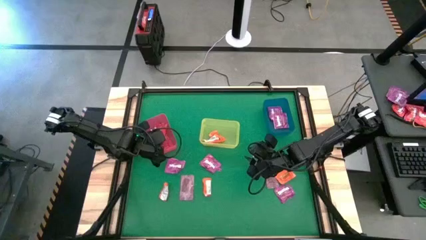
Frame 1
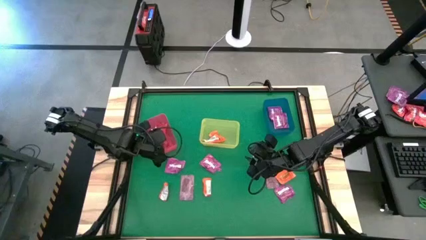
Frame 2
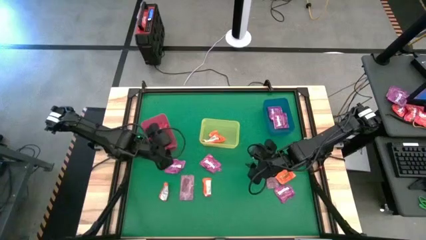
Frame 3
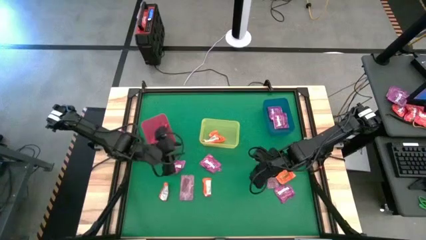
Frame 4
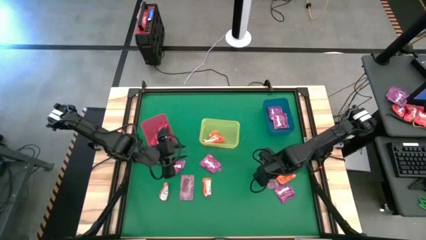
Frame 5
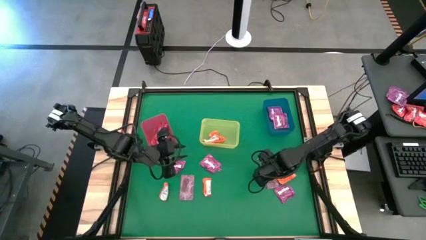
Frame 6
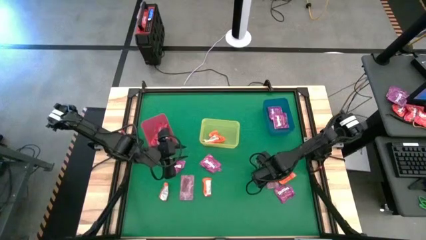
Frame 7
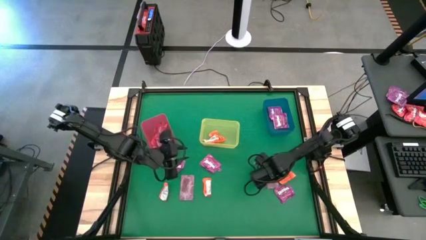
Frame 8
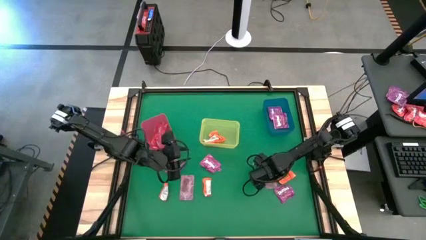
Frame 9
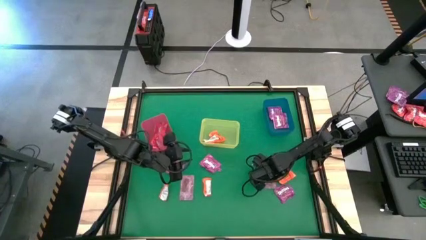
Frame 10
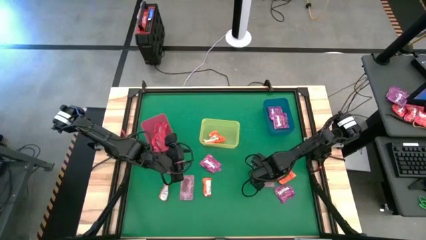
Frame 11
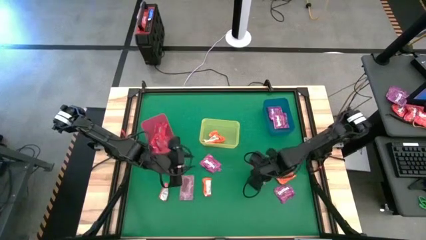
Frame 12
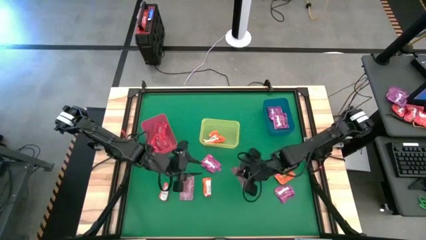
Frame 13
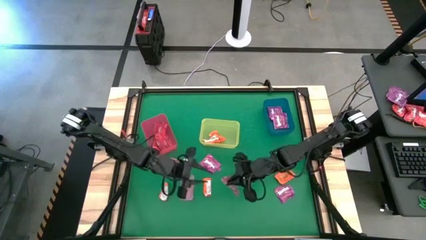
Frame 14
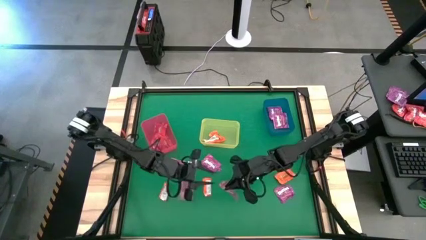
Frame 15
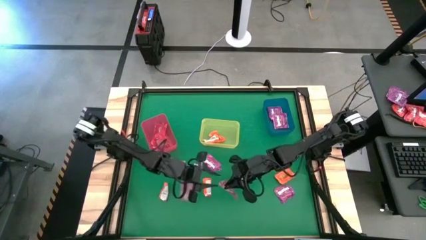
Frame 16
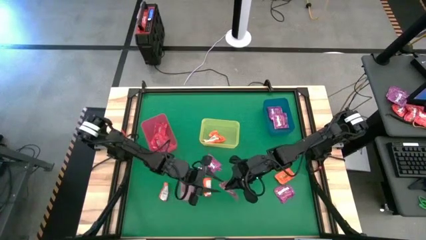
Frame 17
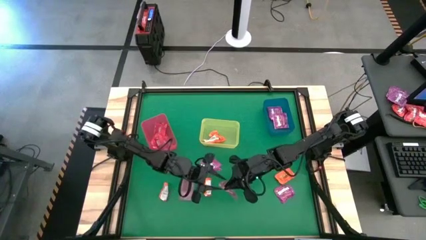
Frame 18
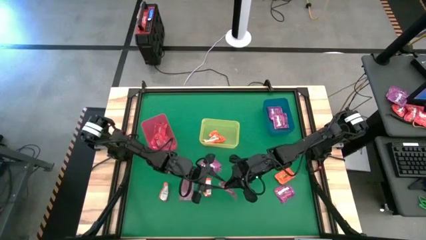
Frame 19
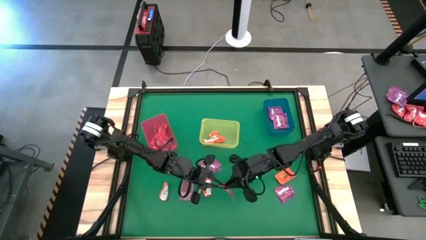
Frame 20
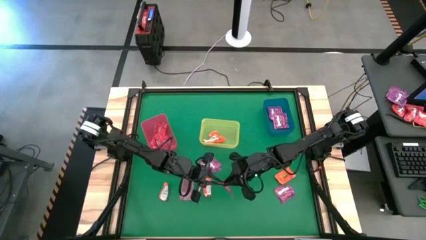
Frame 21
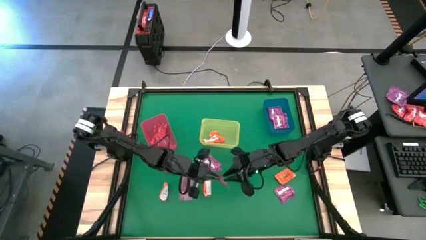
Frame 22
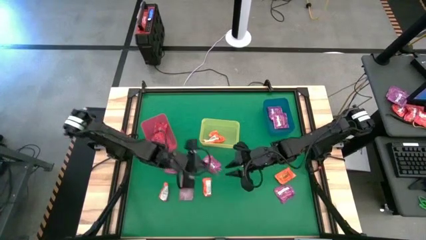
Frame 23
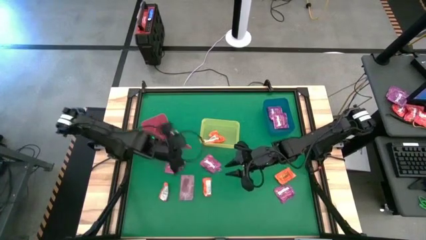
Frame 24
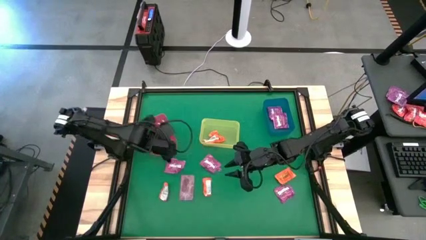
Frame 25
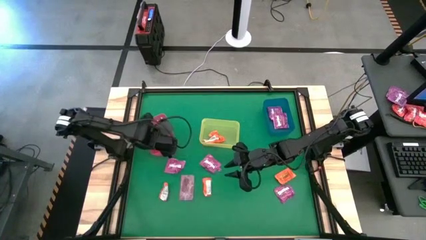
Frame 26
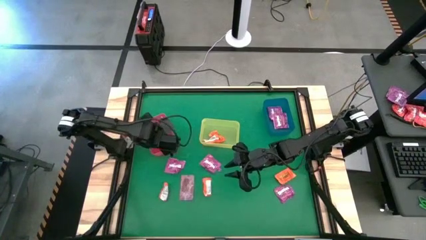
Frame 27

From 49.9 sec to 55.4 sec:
Task: Sort candy by brand, put in halloween buckets
Put the red candy into the red bin

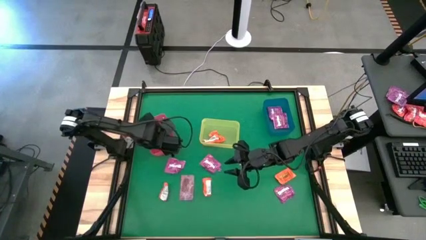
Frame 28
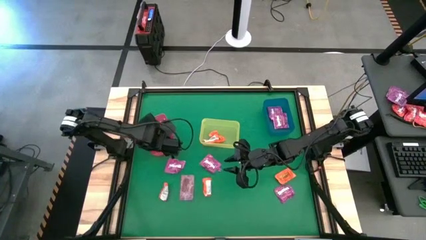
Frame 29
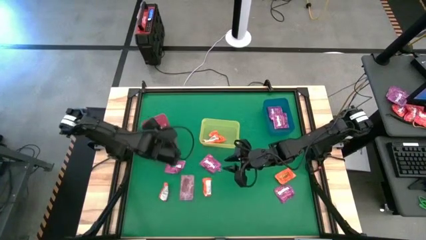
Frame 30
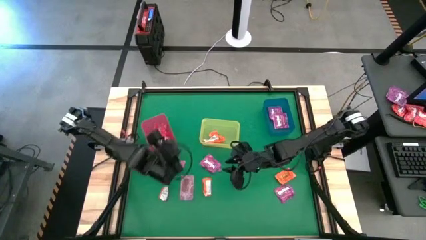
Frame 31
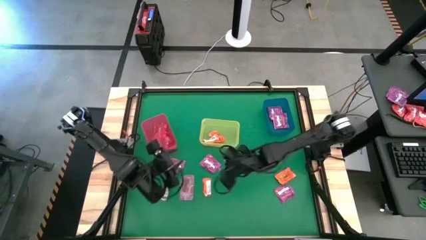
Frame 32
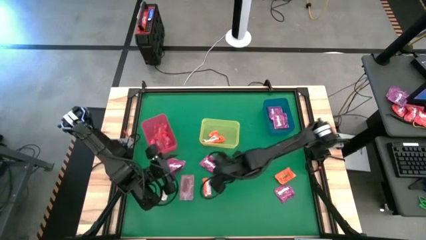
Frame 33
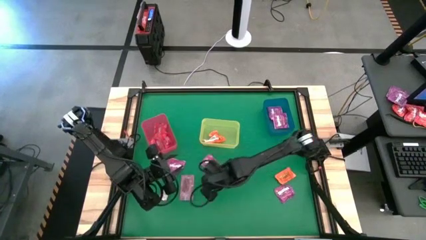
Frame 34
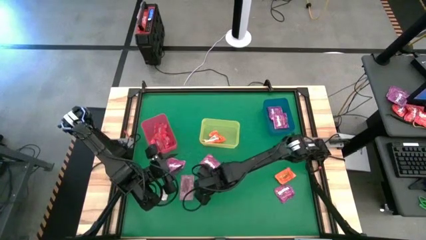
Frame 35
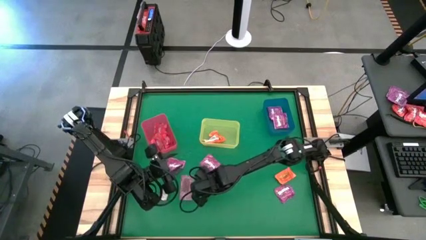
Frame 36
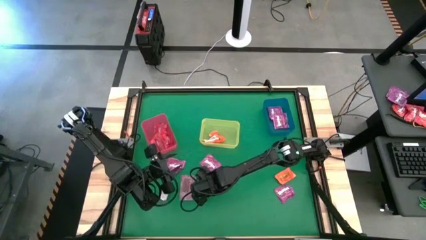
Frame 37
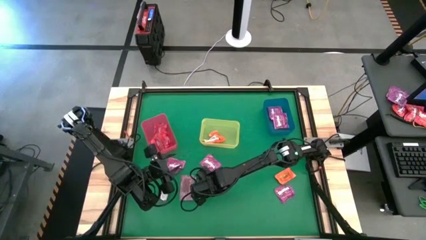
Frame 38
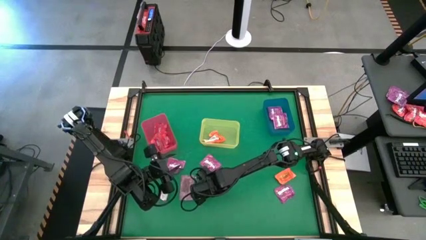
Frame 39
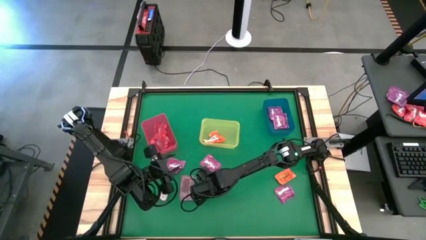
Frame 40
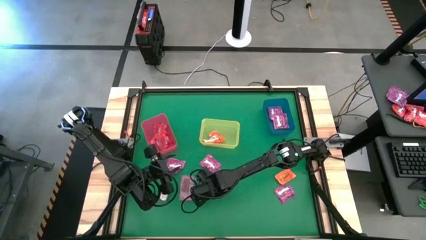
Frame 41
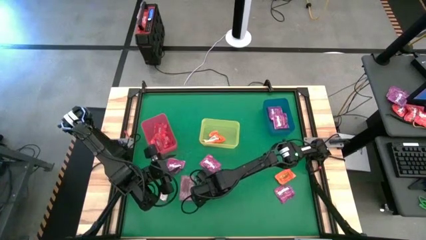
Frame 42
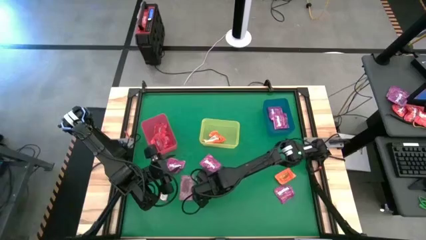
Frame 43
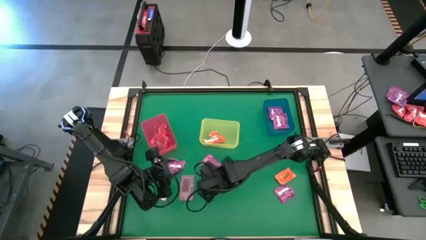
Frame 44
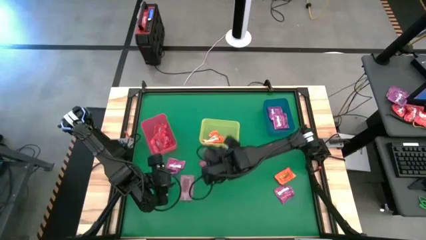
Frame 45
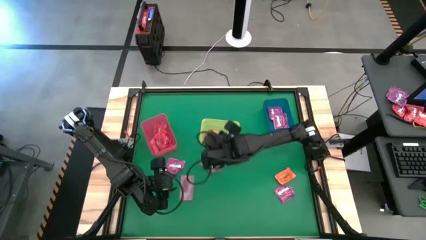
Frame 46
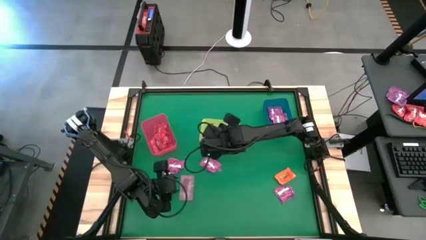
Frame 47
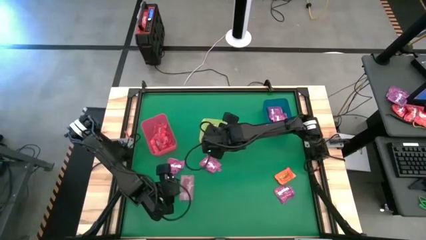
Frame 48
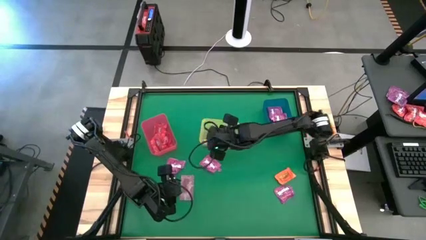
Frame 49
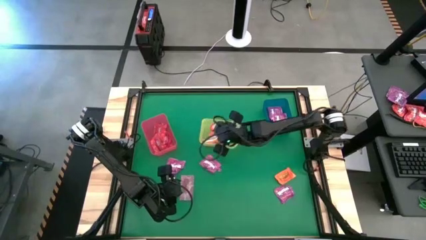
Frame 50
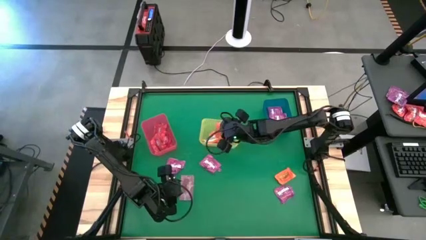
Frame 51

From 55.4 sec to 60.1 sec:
Put the orange chocolate into the yellow bin

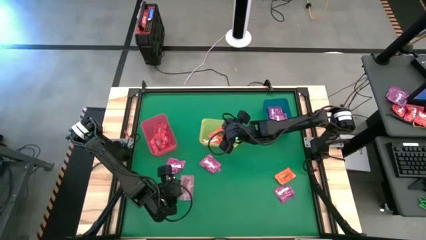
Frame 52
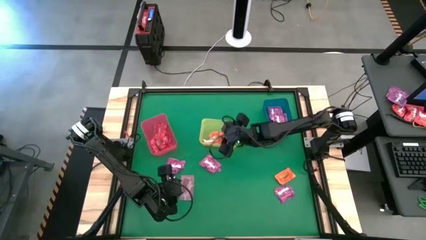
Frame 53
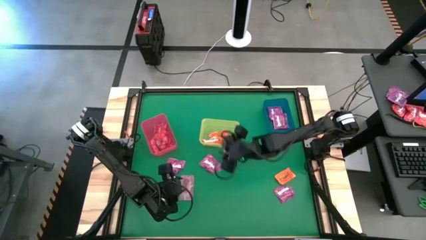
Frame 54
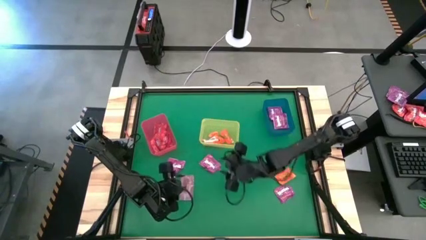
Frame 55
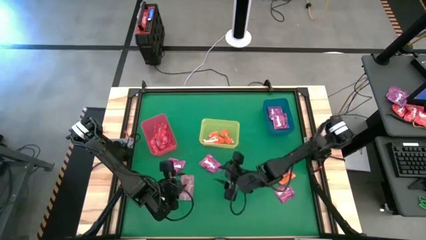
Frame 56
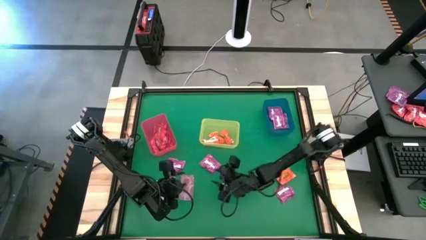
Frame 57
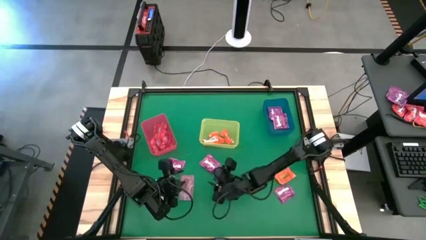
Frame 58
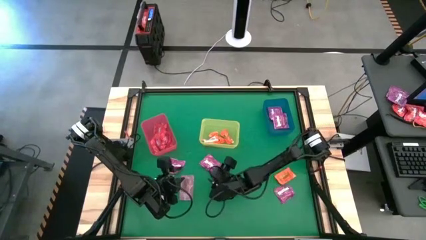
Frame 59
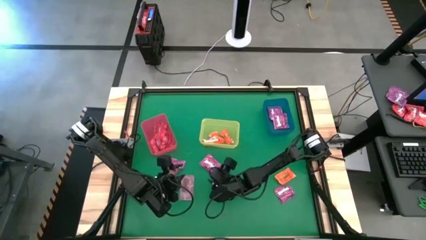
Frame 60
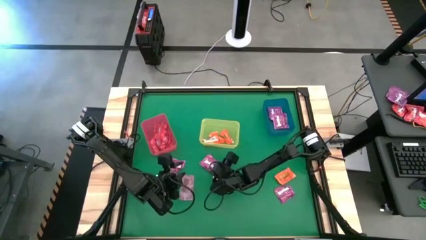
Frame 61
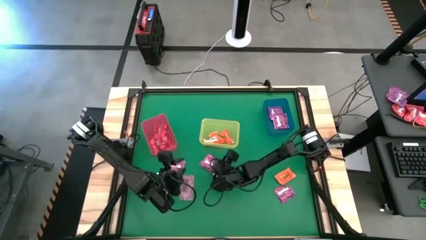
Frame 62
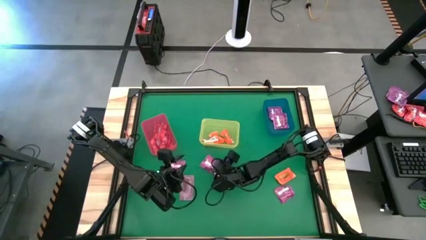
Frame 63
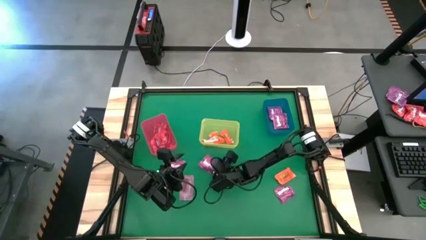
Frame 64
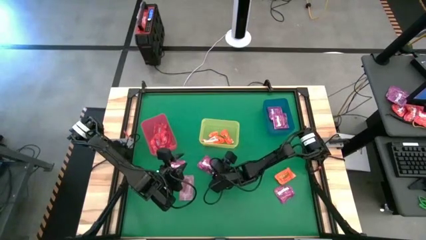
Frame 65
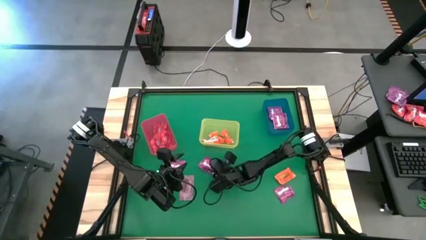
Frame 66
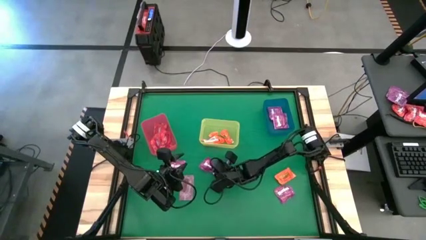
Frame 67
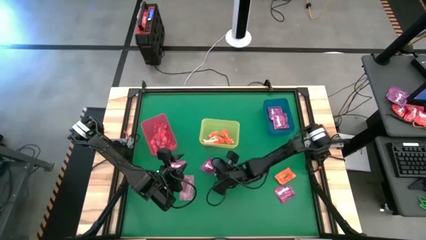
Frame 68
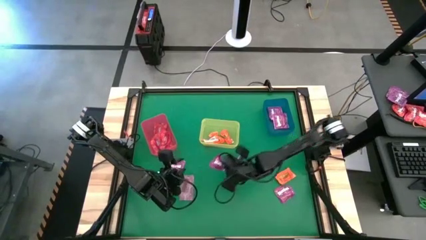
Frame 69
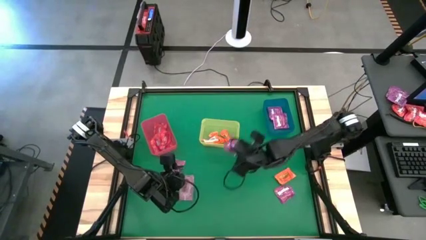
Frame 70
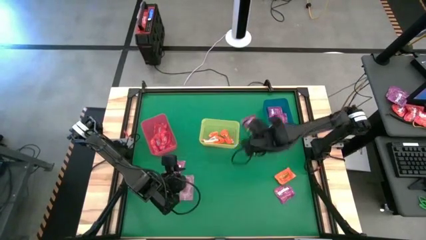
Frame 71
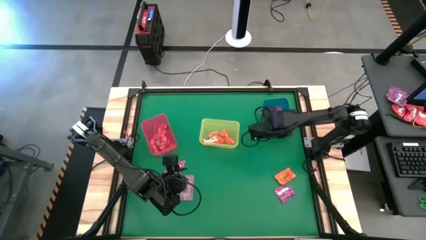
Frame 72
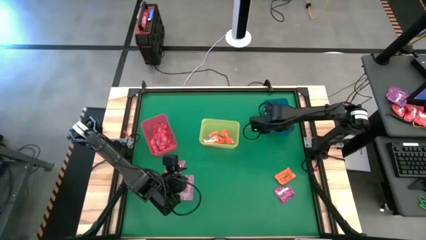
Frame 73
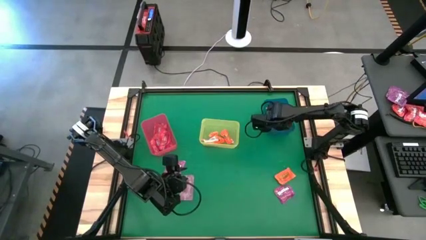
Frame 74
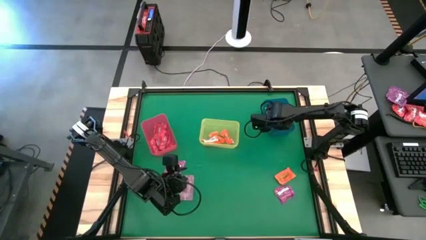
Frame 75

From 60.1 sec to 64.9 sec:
Put the purple candy into the blue bin

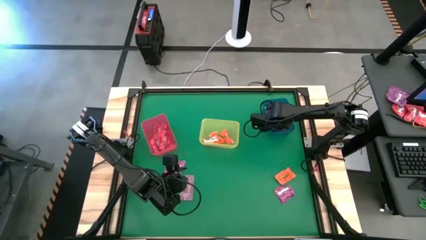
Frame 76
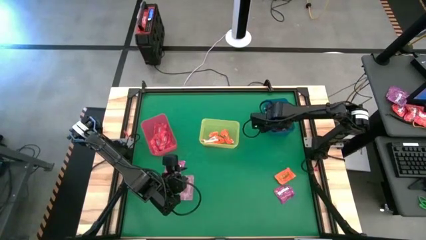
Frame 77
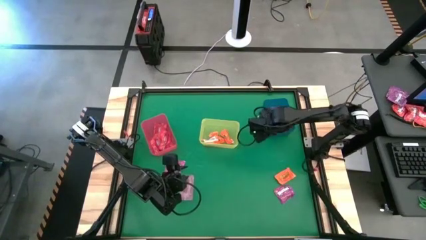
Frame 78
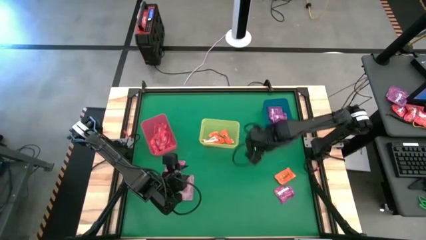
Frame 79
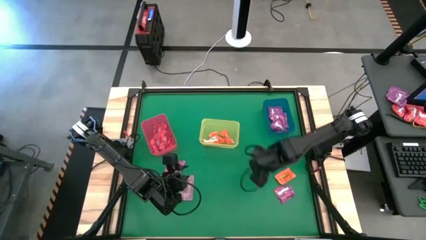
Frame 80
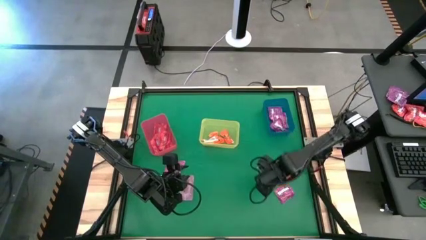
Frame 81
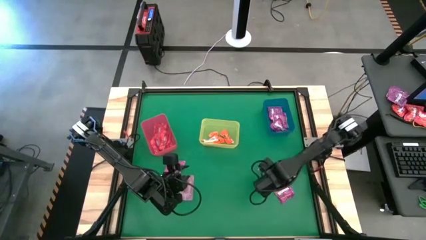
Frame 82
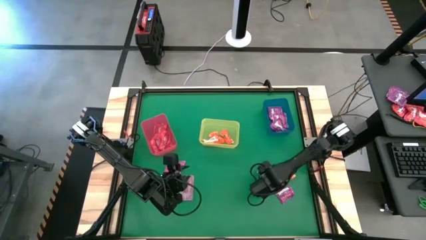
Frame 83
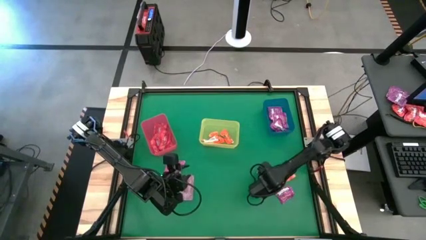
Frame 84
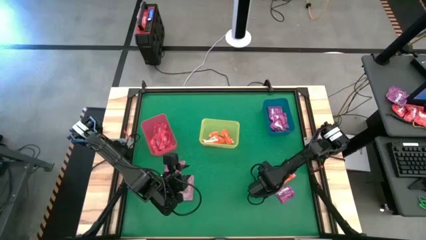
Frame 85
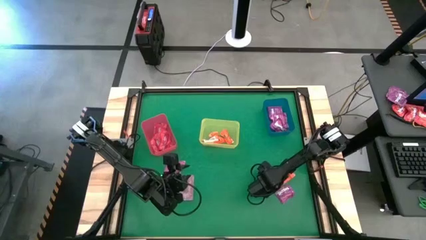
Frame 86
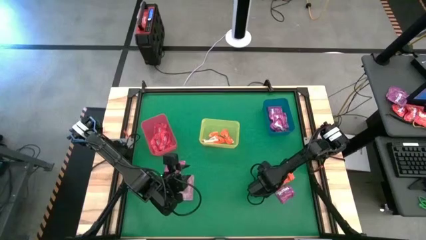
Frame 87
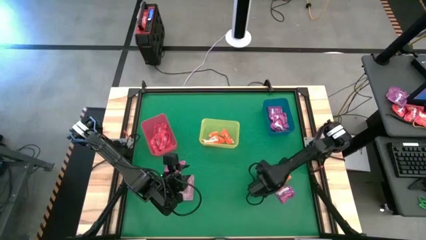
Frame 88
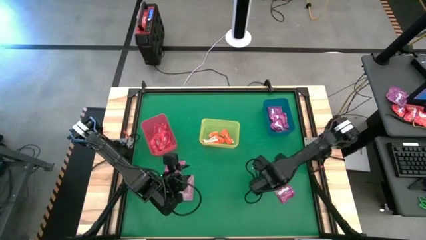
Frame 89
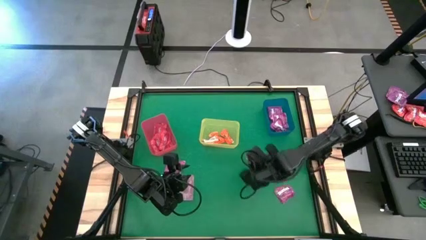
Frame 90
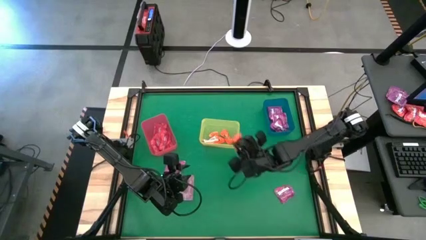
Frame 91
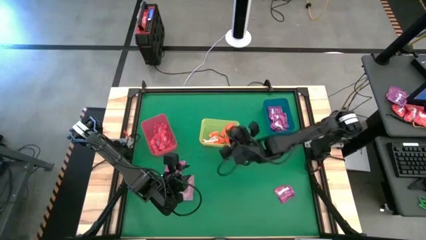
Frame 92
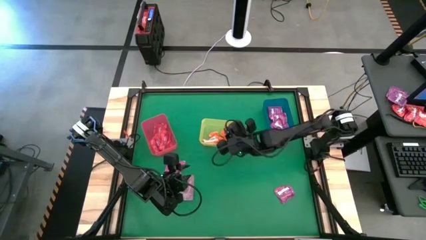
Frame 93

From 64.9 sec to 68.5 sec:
Put the orange chocolate into the yellow bin
